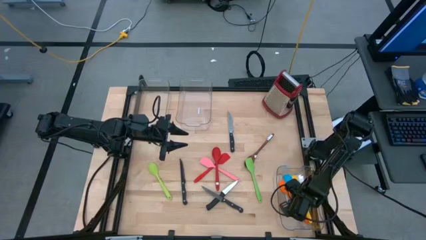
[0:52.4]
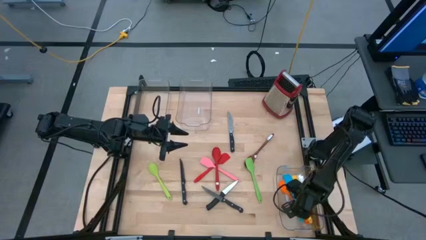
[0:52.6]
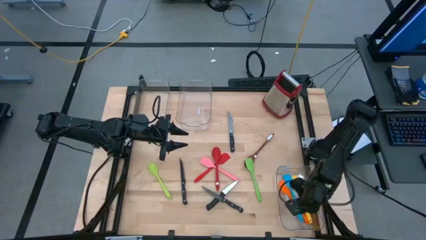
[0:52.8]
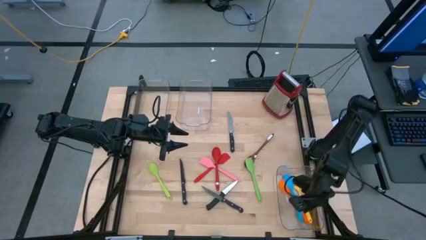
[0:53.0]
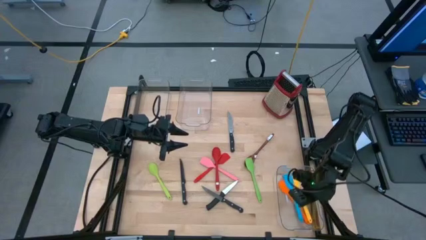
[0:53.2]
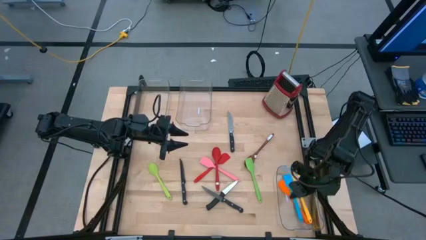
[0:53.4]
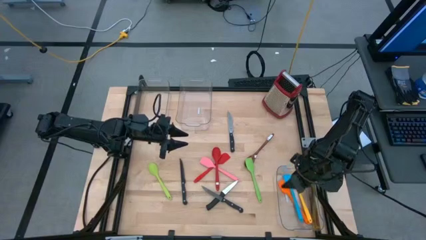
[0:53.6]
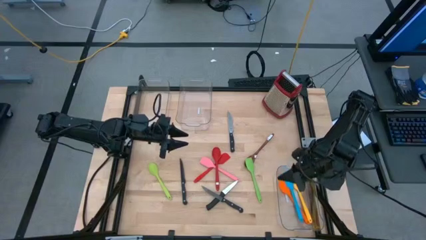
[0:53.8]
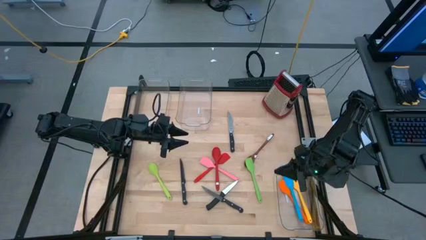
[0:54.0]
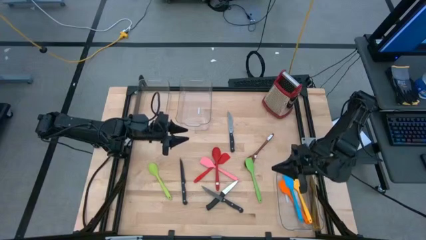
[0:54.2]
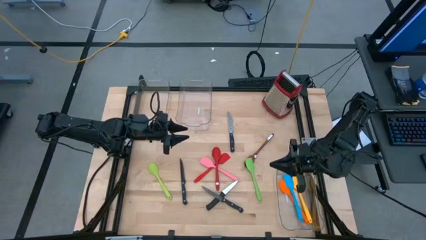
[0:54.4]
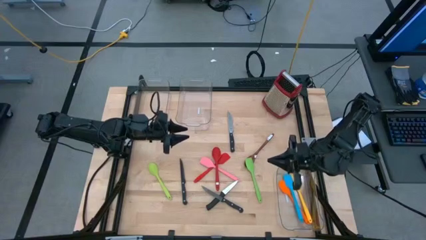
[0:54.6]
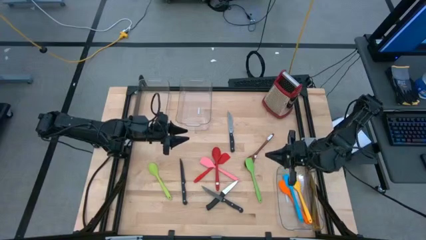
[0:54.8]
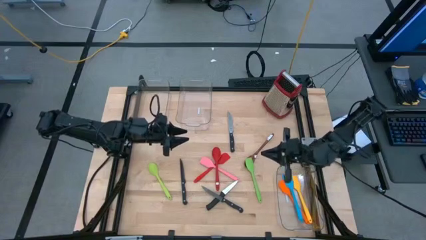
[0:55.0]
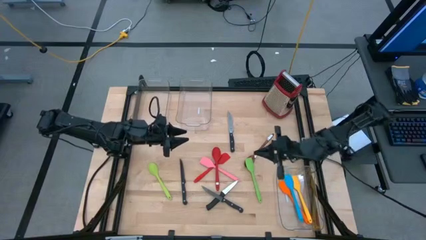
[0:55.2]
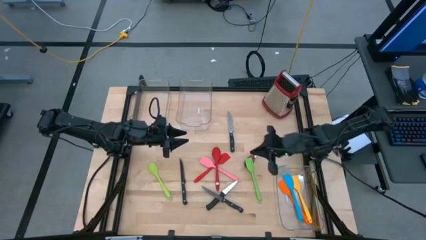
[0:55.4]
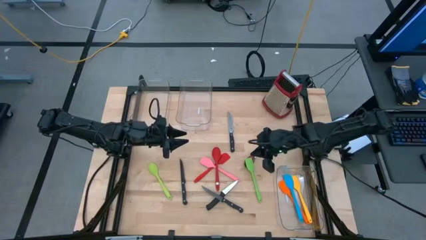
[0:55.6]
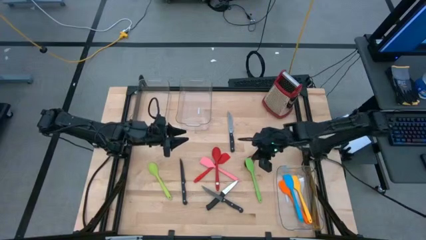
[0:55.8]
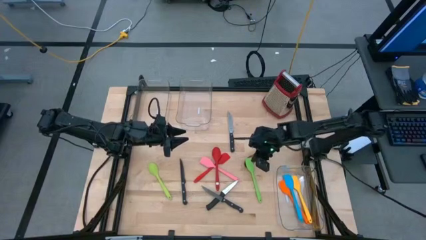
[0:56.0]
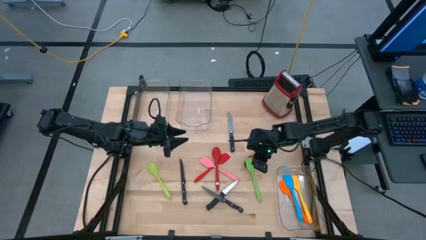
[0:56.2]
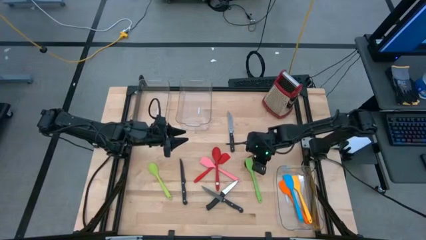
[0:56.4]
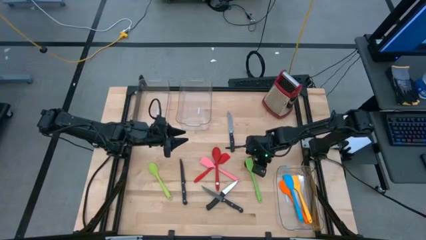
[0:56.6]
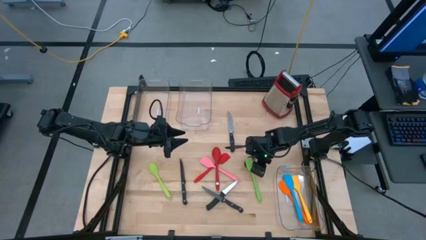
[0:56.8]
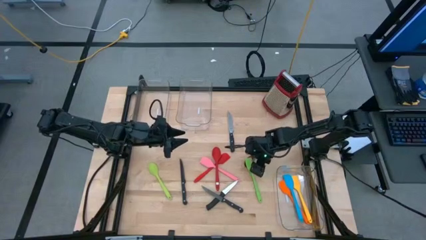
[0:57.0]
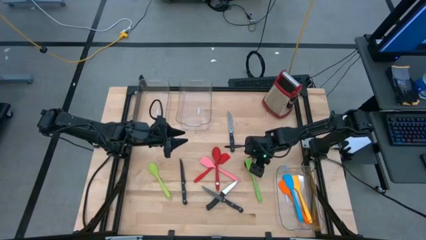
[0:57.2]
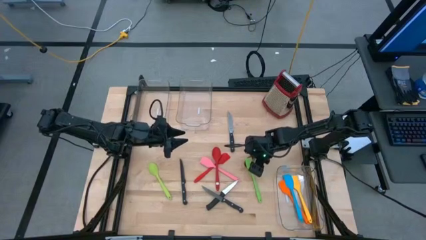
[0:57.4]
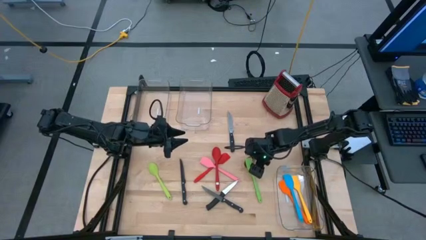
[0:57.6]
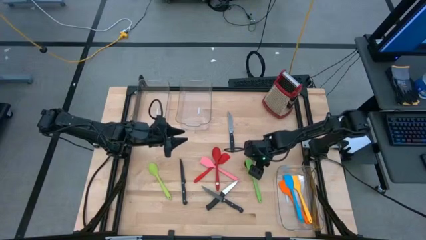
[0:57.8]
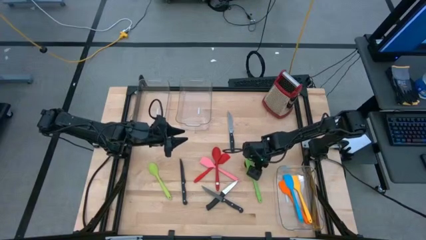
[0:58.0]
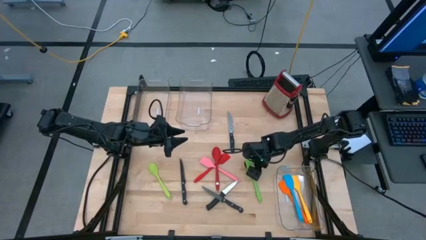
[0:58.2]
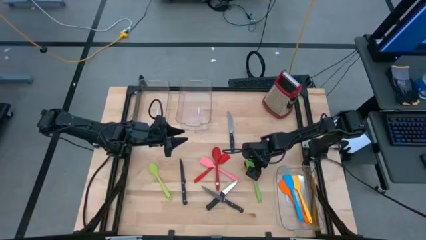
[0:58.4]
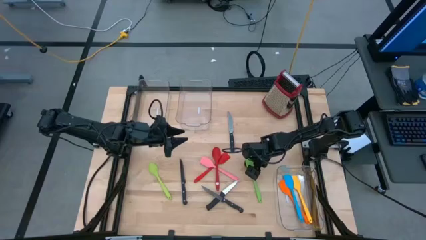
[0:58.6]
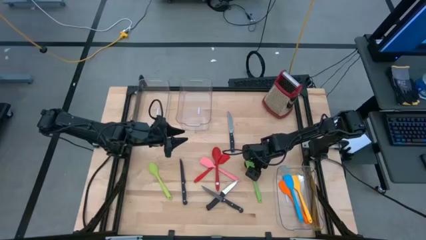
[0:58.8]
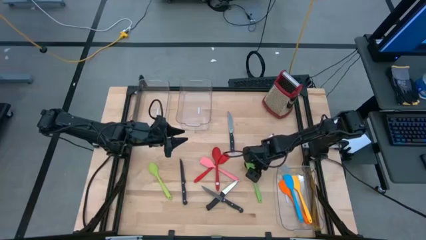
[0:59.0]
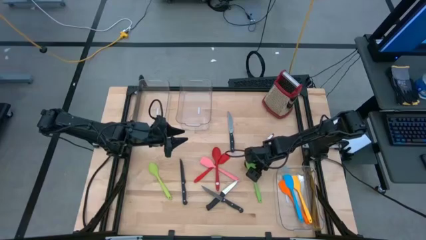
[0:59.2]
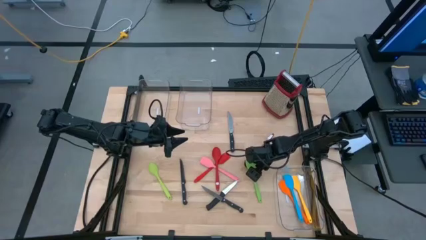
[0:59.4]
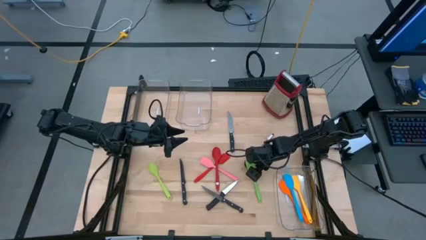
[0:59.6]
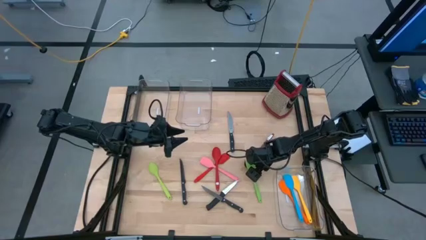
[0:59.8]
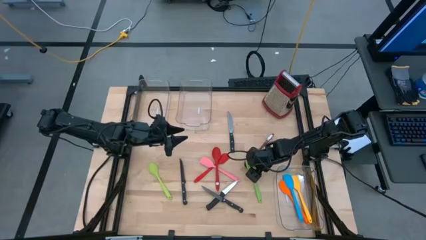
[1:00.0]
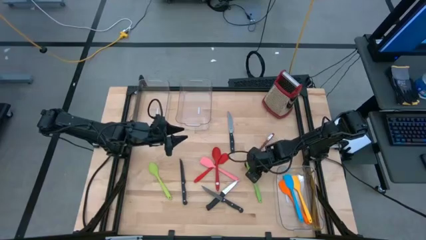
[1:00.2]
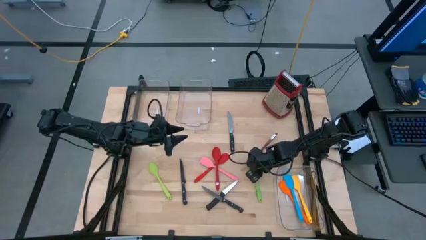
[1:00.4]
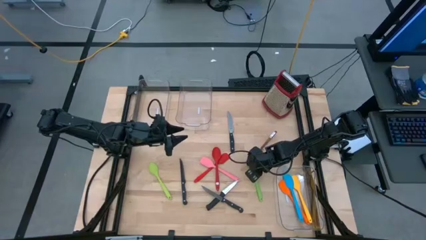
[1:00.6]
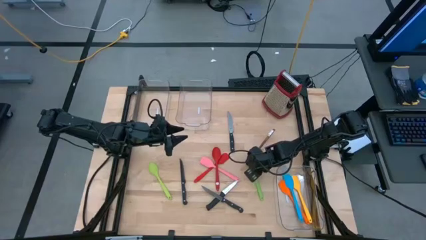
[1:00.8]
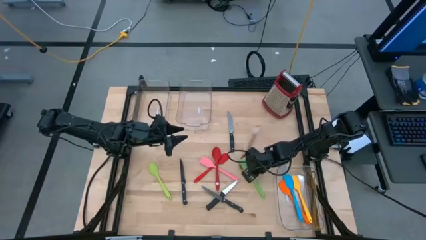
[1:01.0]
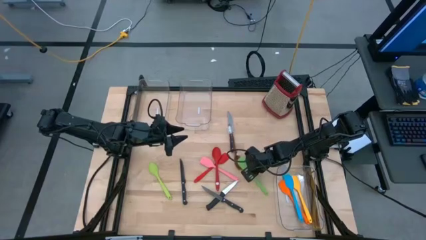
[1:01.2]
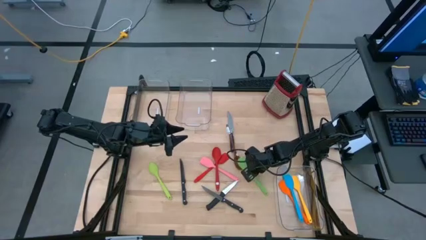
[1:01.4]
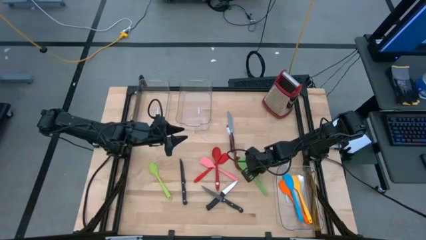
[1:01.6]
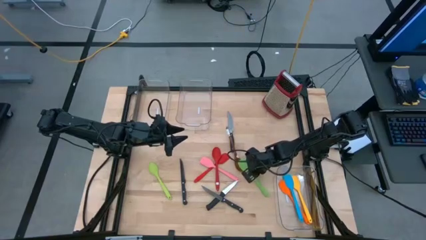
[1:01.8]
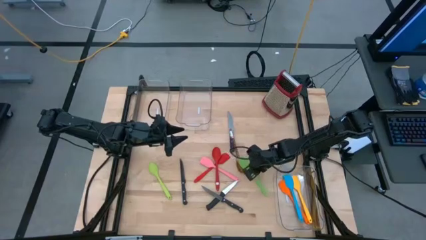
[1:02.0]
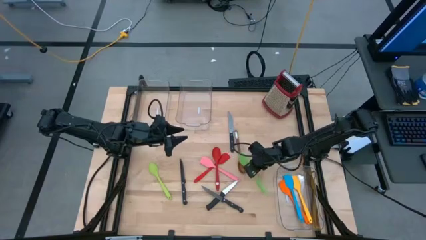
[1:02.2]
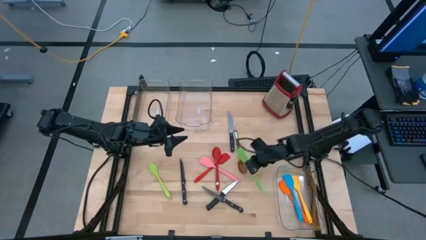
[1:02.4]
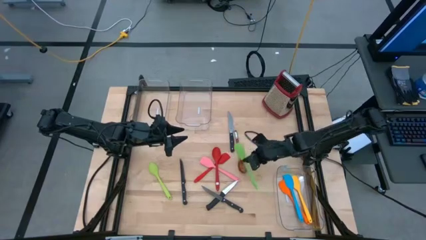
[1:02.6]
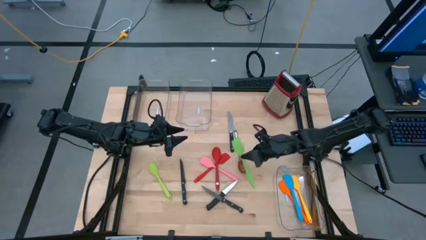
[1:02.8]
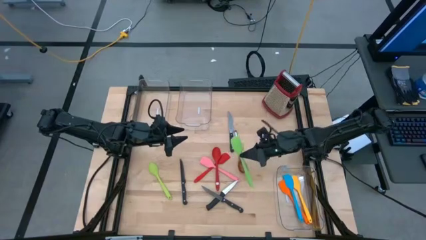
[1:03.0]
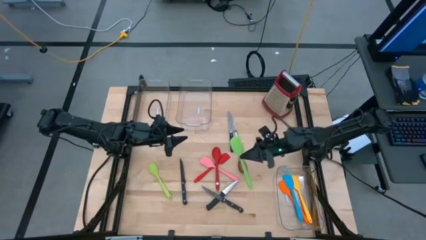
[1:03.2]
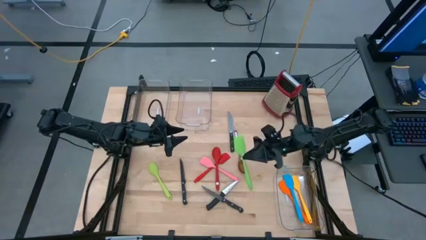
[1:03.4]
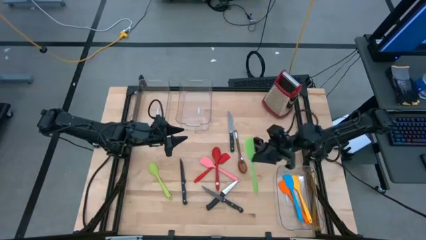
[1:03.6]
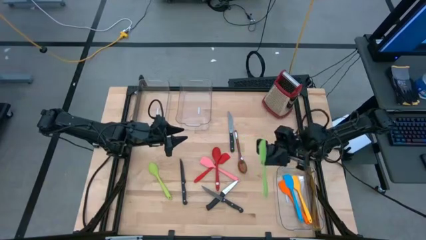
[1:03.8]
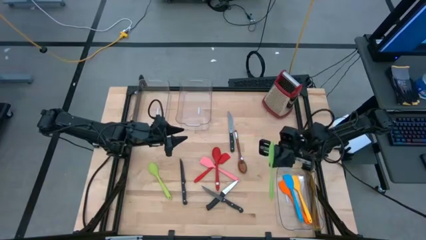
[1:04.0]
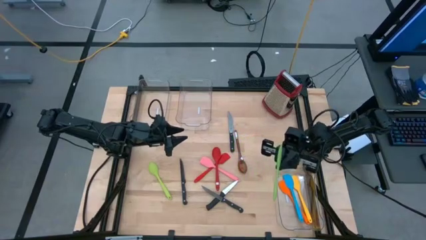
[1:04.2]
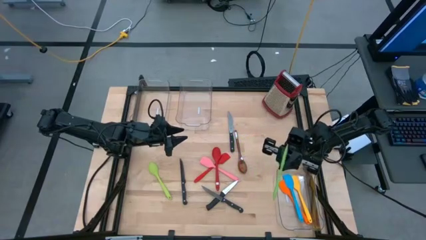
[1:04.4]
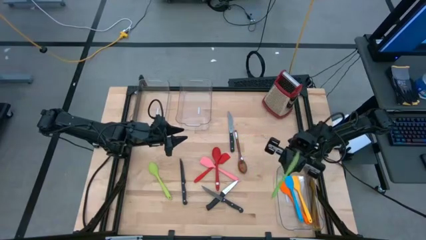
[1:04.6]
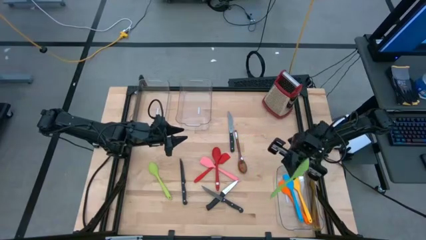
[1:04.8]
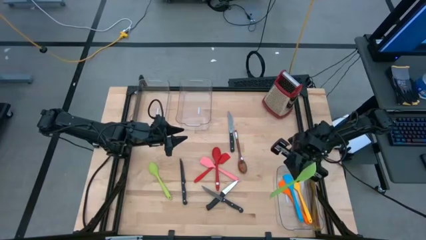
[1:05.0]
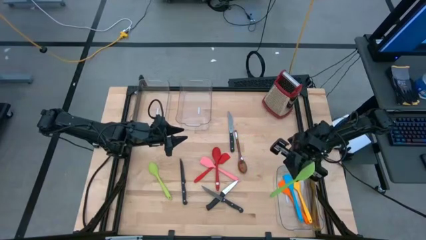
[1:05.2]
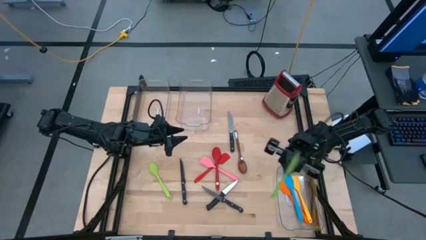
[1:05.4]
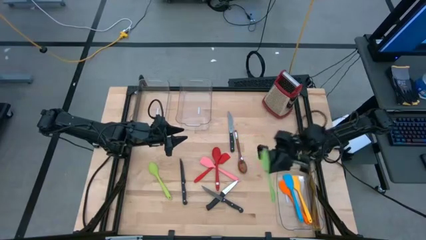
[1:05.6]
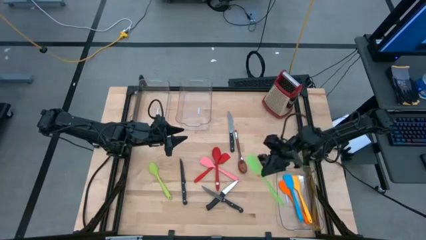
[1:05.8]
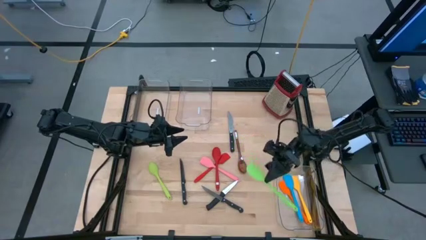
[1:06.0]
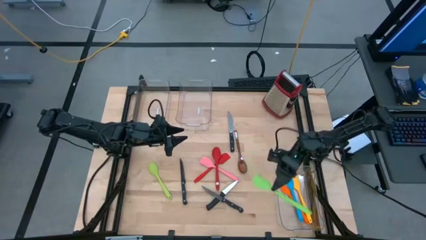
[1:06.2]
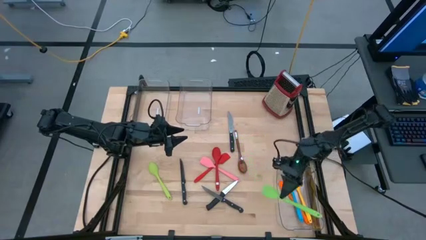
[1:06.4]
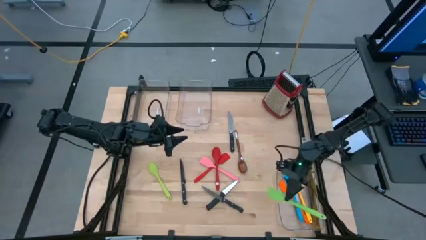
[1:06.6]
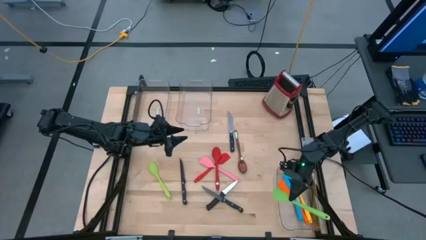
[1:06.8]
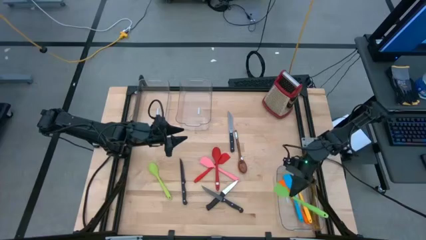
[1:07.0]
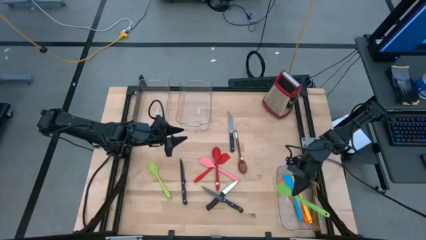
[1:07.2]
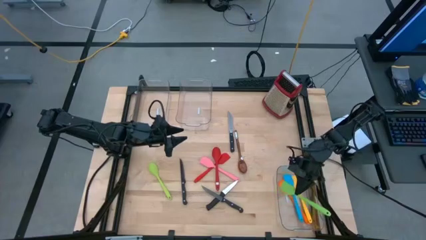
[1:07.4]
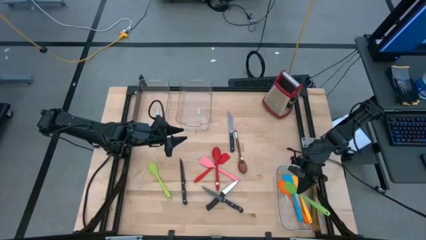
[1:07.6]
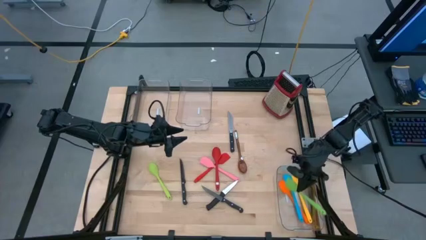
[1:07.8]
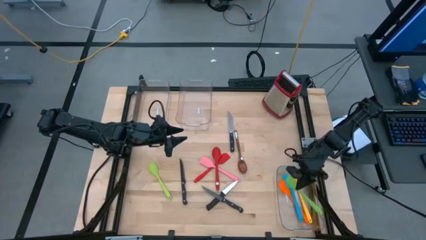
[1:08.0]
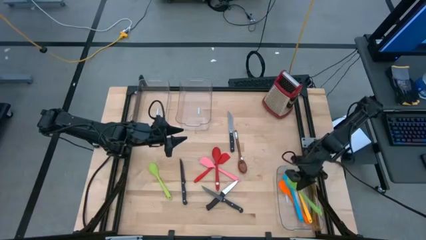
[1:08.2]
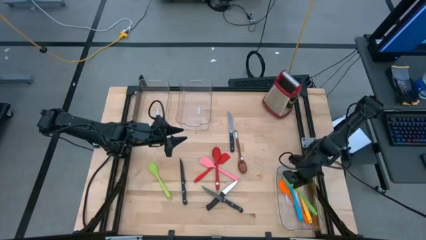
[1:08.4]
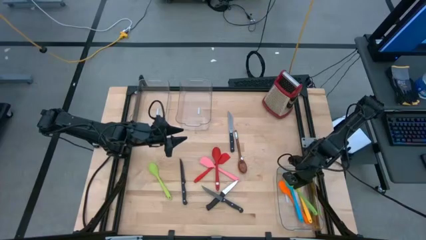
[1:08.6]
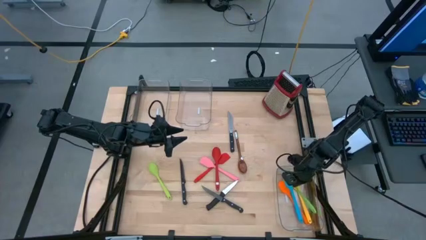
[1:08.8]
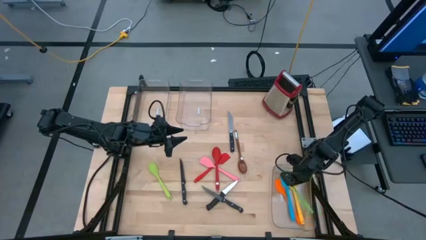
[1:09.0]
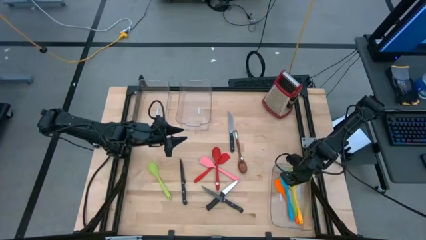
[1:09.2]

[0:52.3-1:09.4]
Task: Pick & Place Kitchen Items
Put the green spatula into the bottom transparent bin
